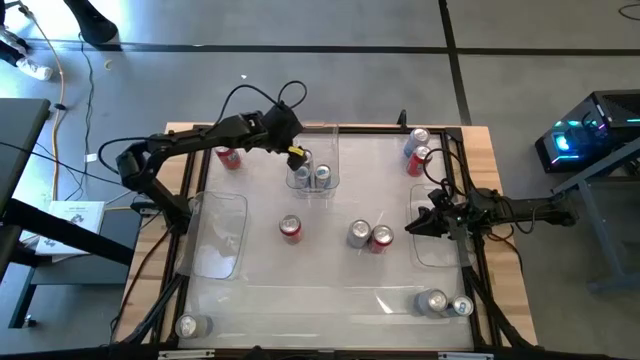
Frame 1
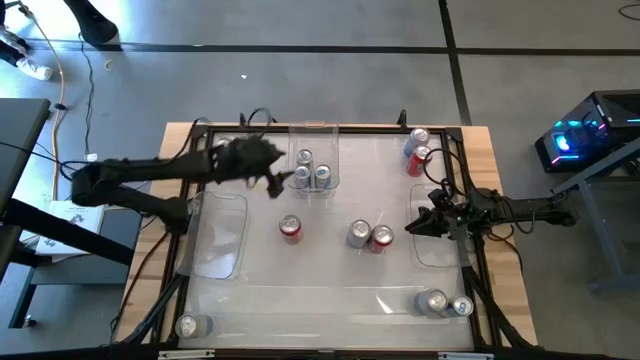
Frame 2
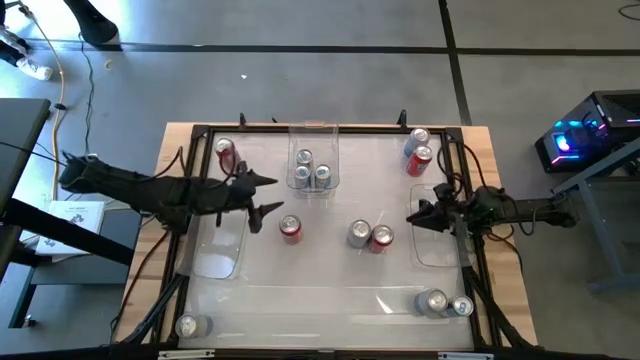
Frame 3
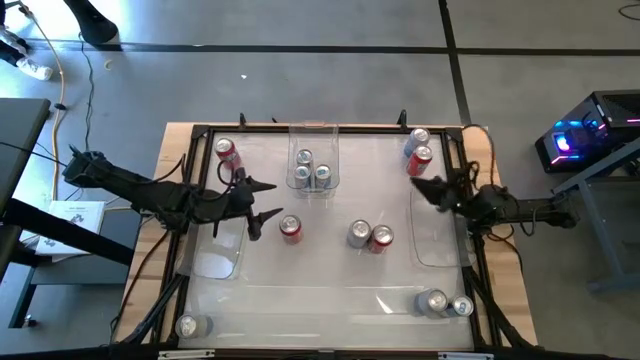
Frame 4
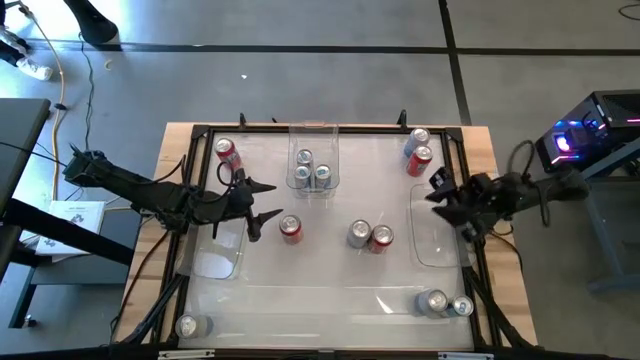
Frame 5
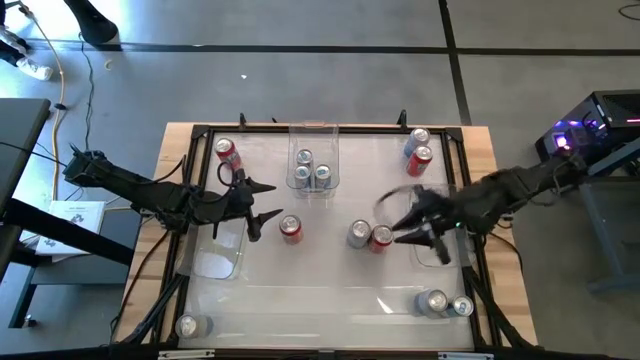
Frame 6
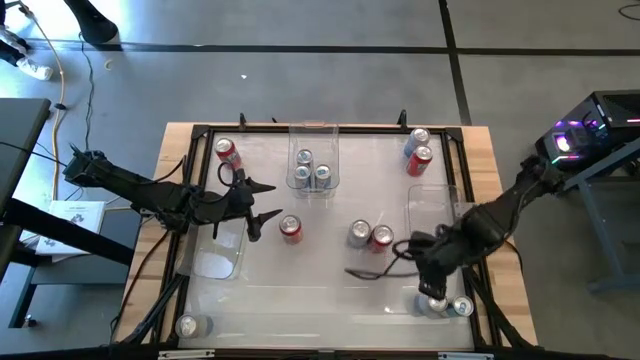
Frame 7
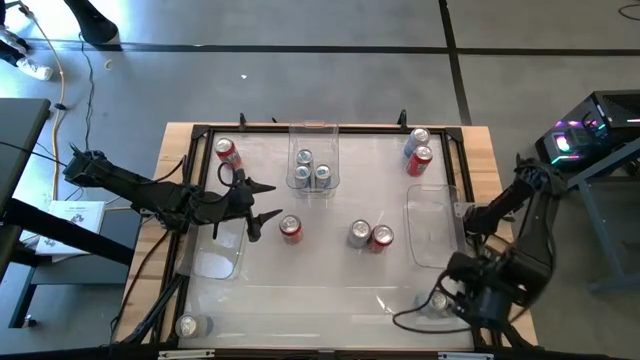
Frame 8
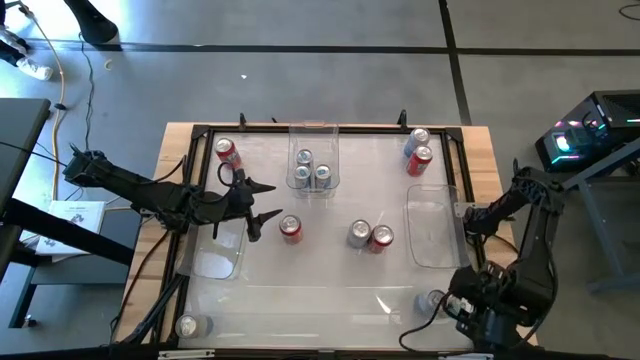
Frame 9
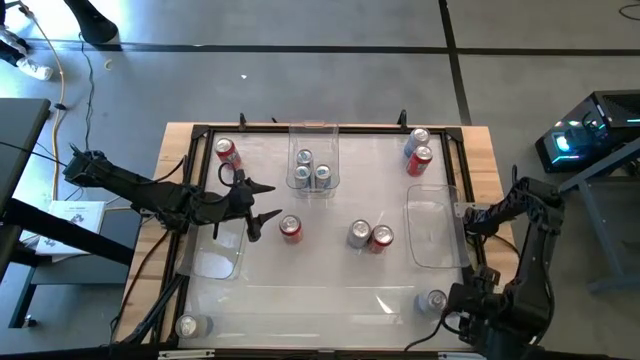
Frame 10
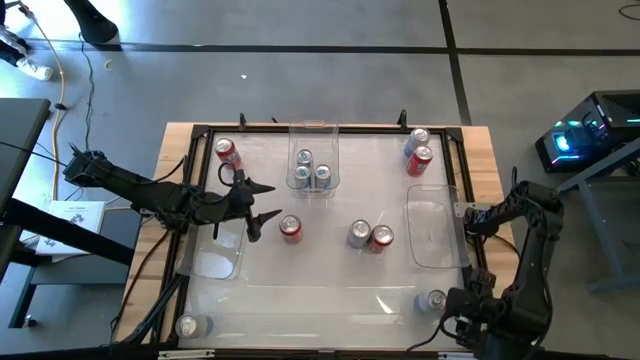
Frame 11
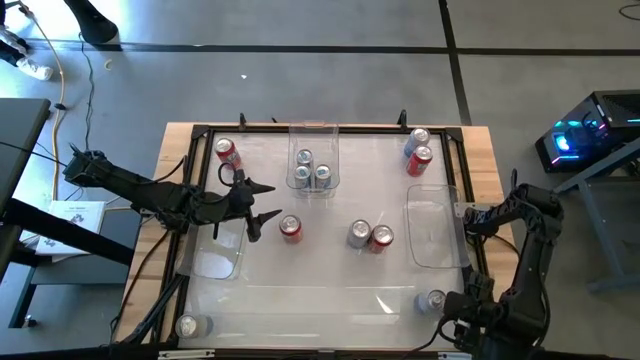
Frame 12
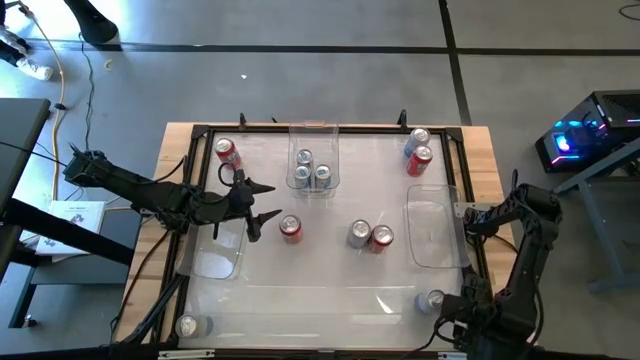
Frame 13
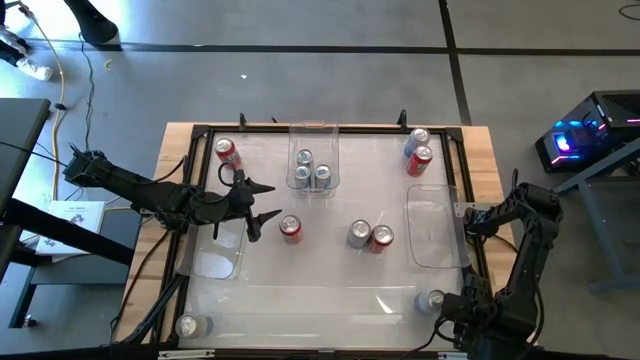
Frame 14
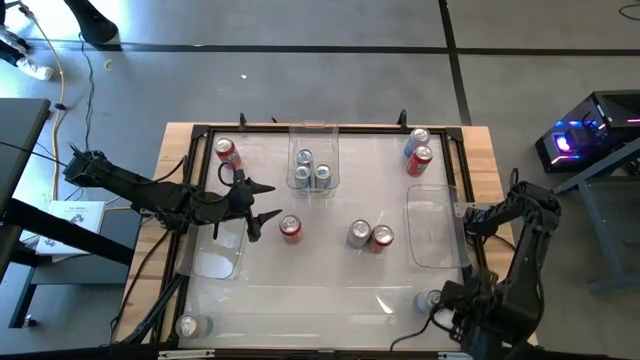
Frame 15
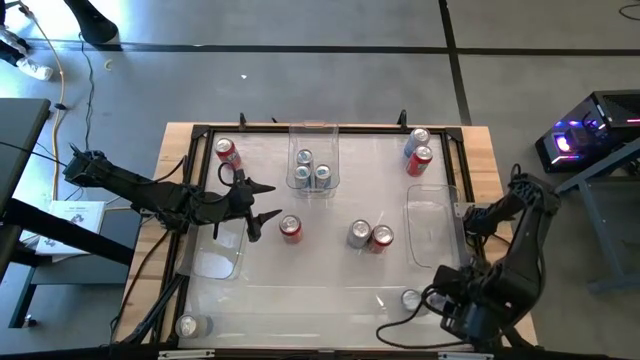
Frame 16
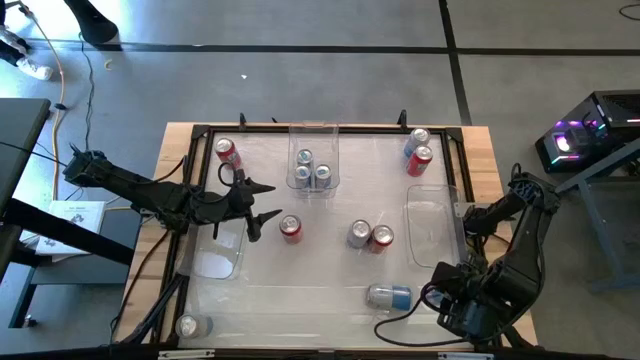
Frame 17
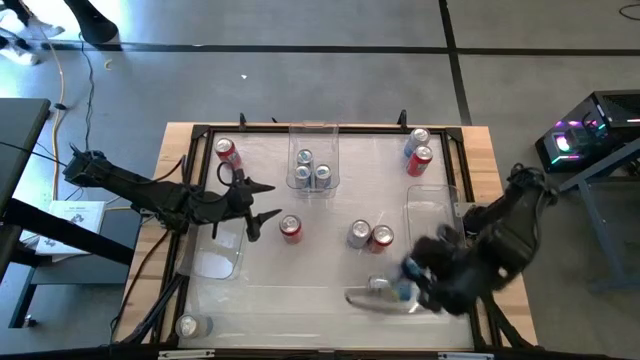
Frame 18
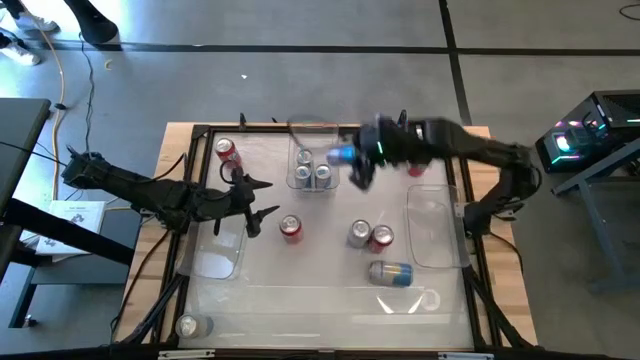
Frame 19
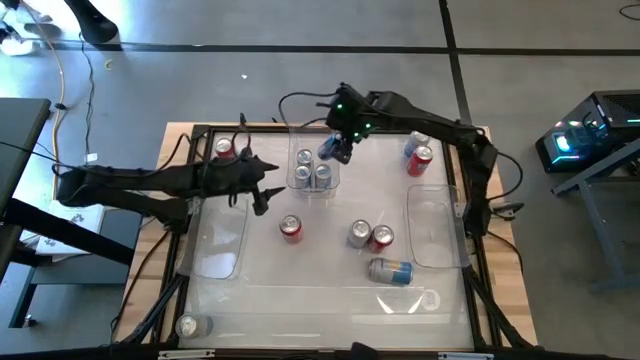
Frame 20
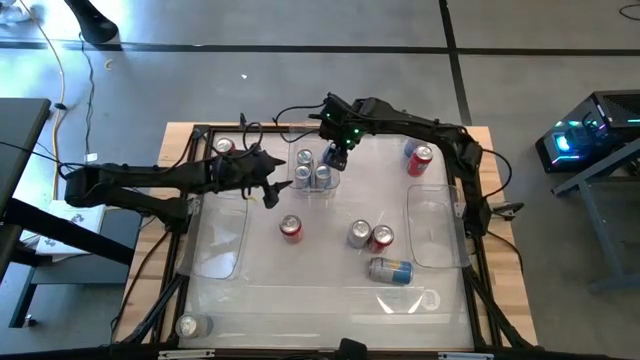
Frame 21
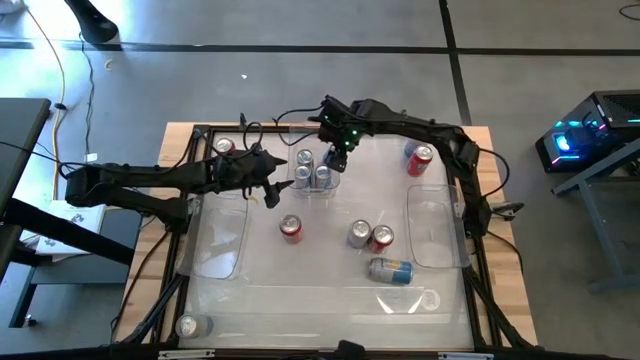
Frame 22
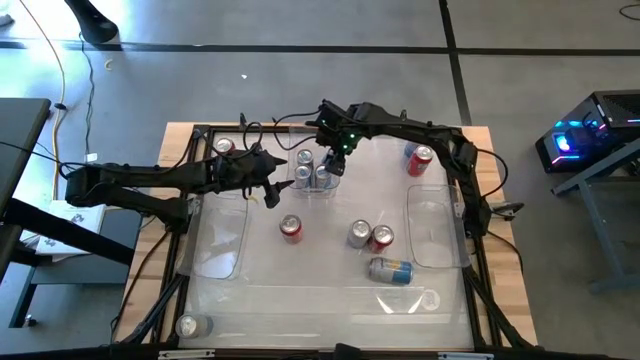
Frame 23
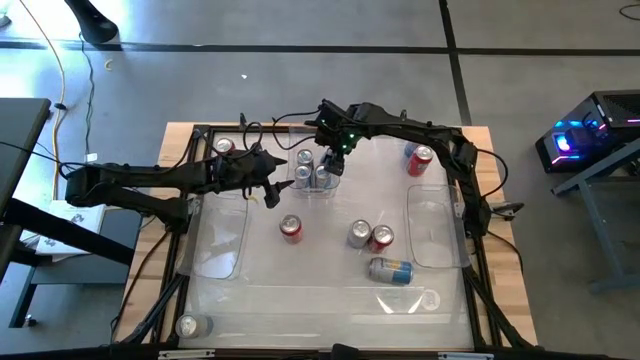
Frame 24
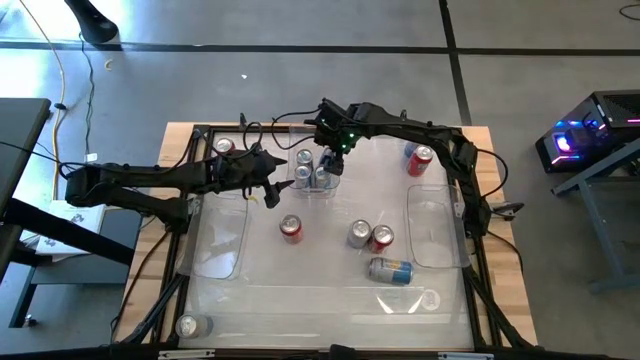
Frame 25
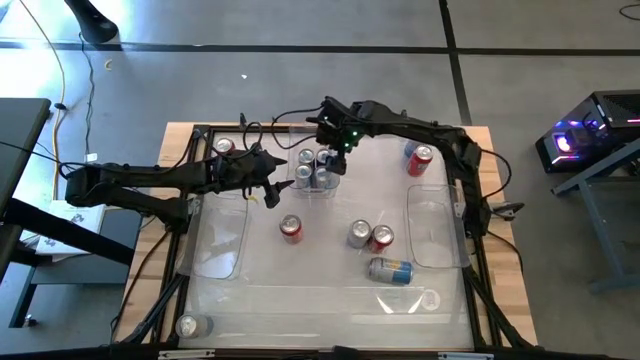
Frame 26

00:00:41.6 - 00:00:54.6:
Task: Sort soda cans
Put the blue soda can into the top center transparent bin

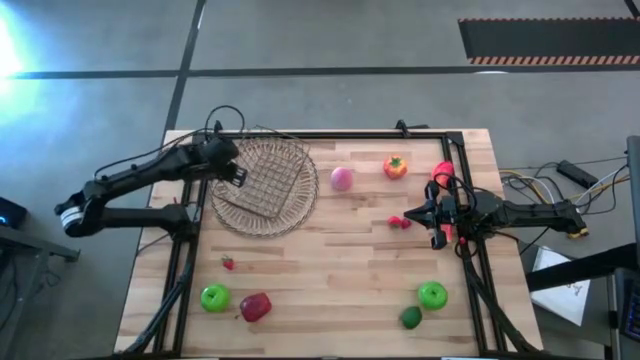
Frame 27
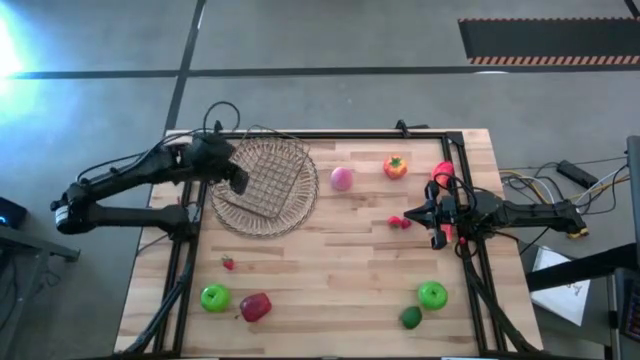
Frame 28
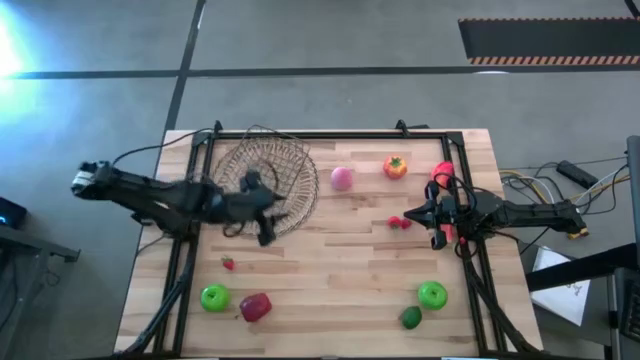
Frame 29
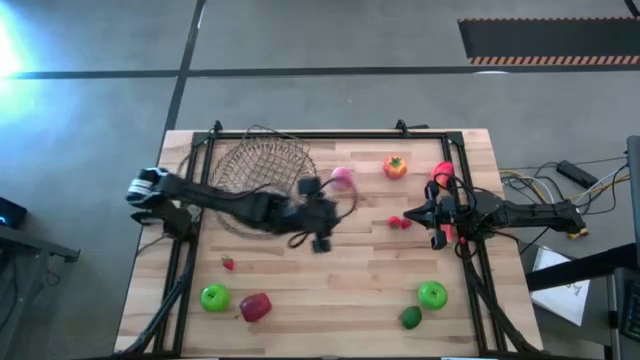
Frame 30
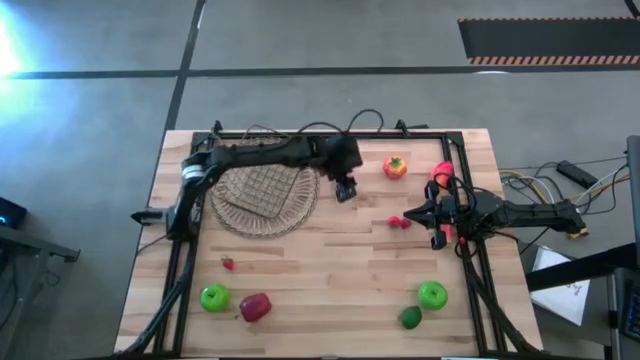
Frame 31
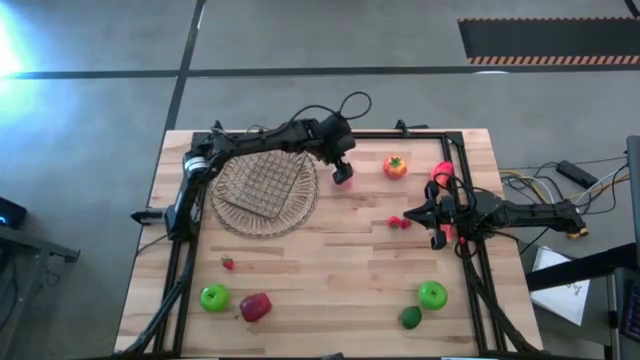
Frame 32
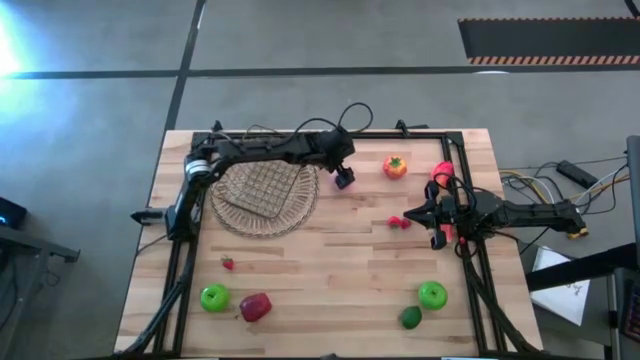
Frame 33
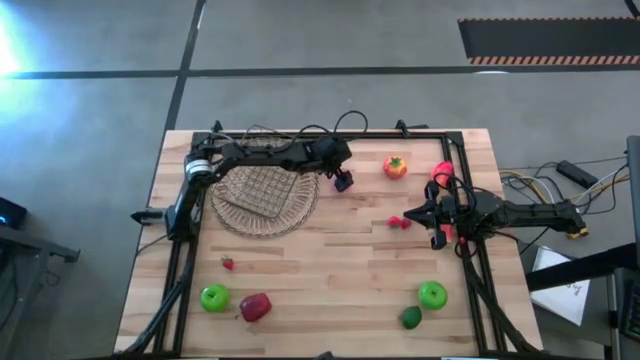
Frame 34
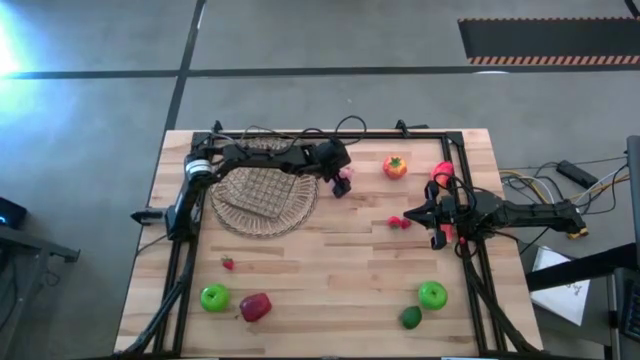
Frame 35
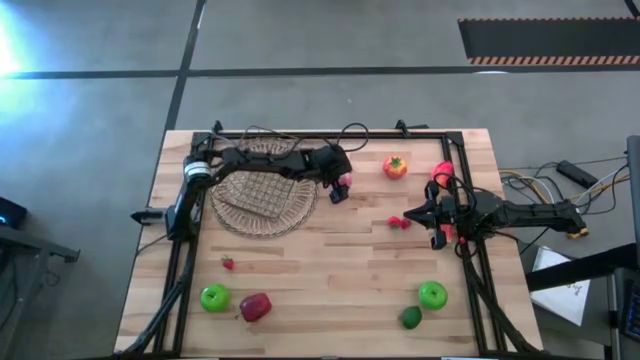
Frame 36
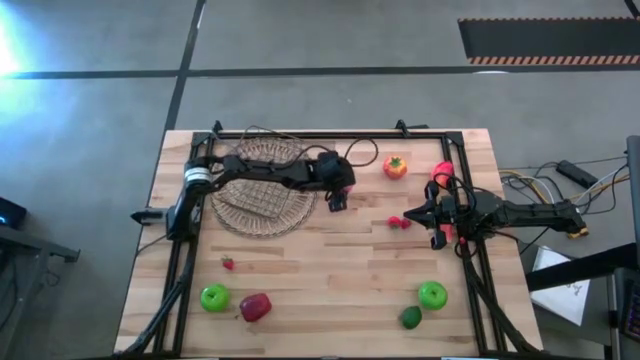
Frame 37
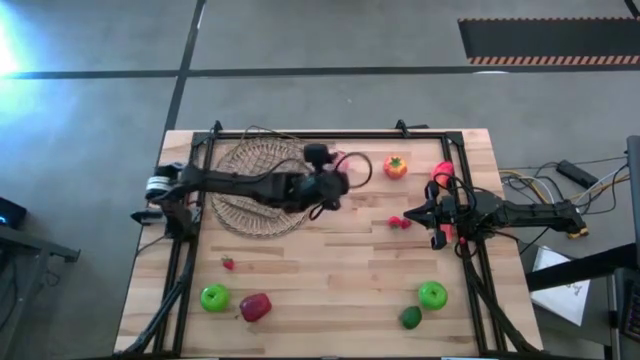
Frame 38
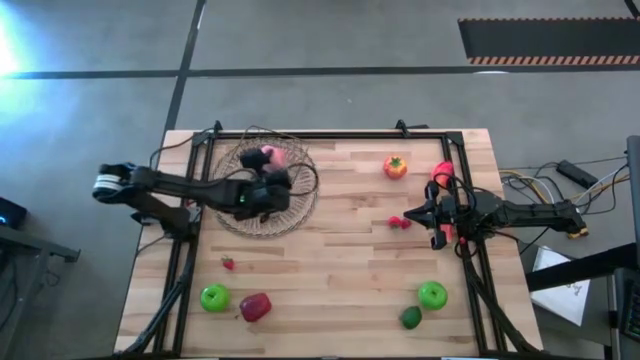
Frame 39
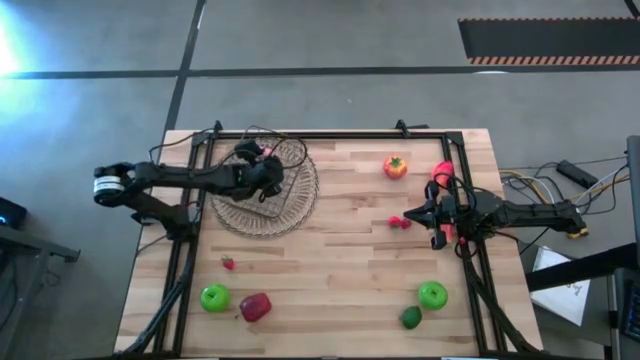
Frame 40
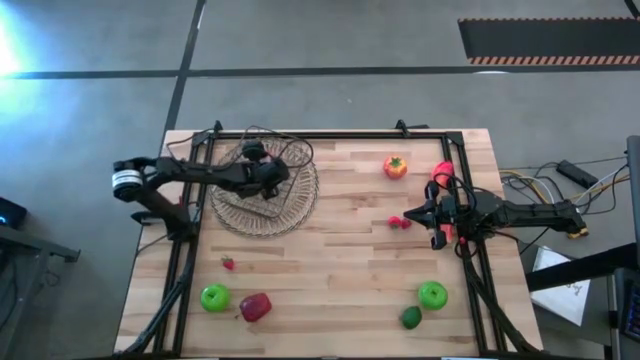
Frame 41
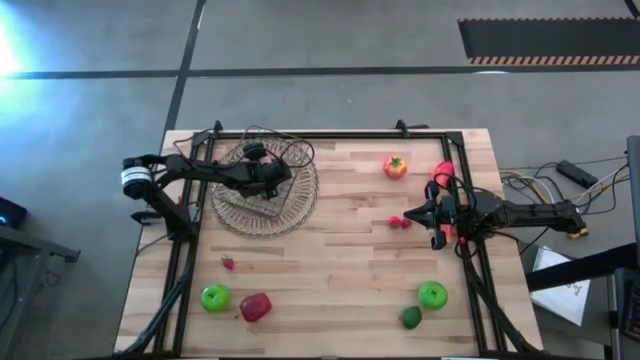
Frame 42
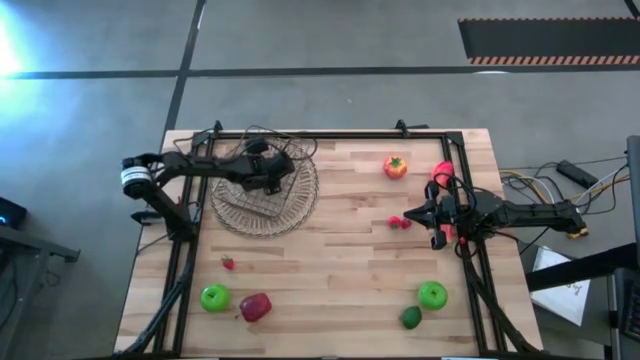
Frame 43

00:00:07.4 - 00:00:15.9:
Task: Build produce basket
Put the peach into the basket
